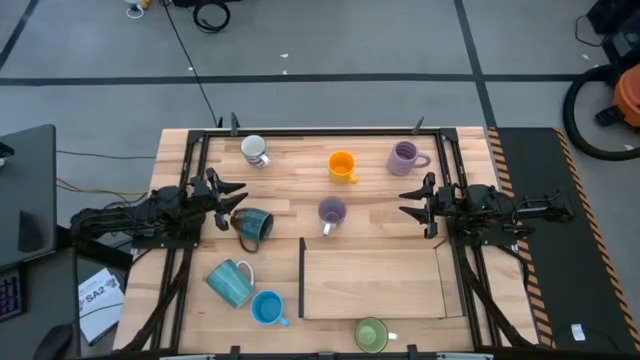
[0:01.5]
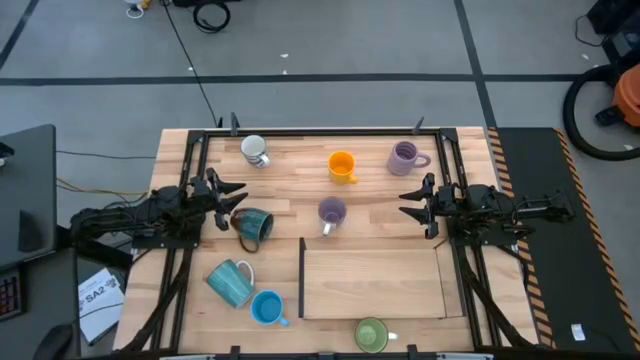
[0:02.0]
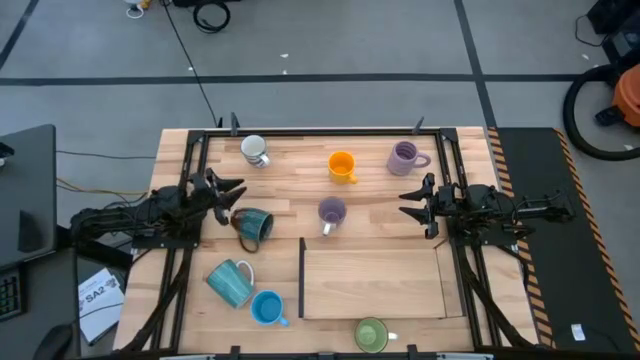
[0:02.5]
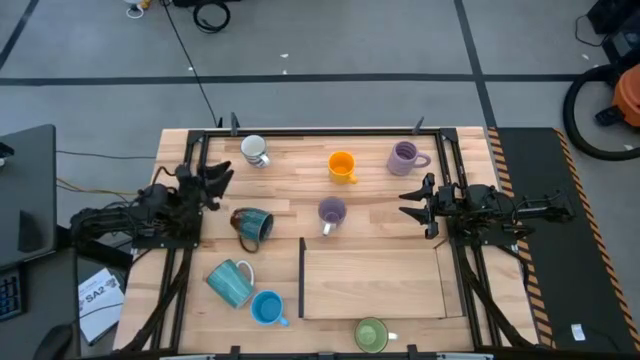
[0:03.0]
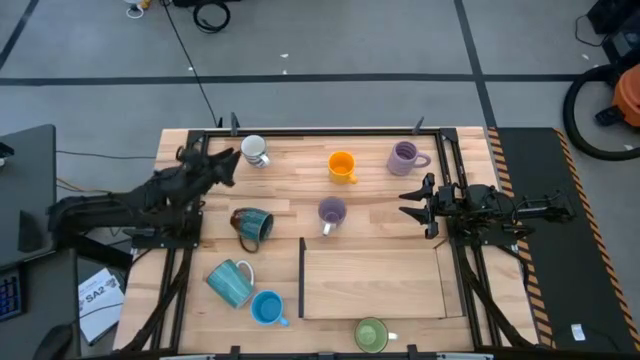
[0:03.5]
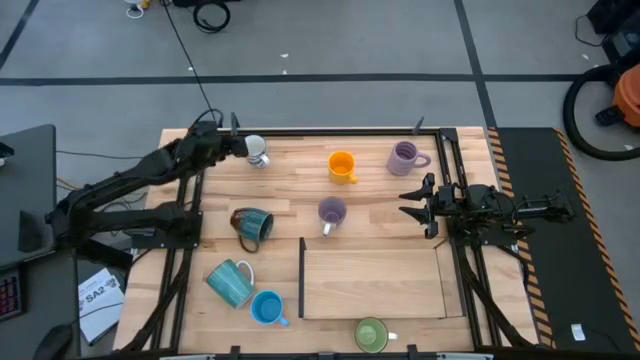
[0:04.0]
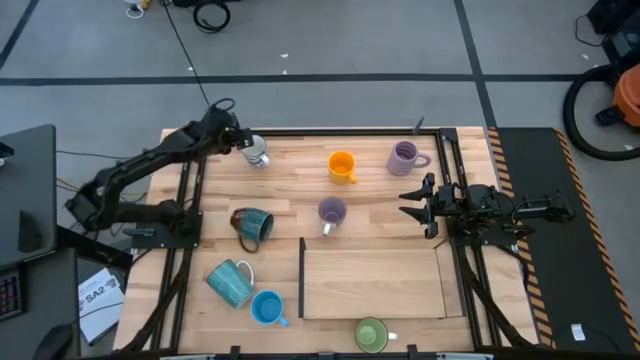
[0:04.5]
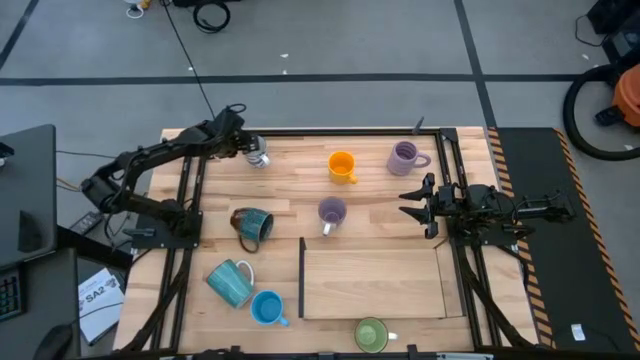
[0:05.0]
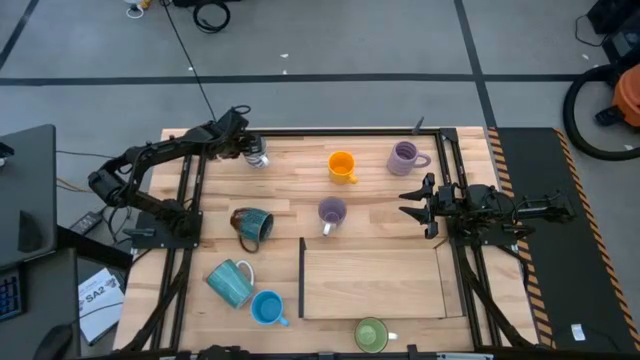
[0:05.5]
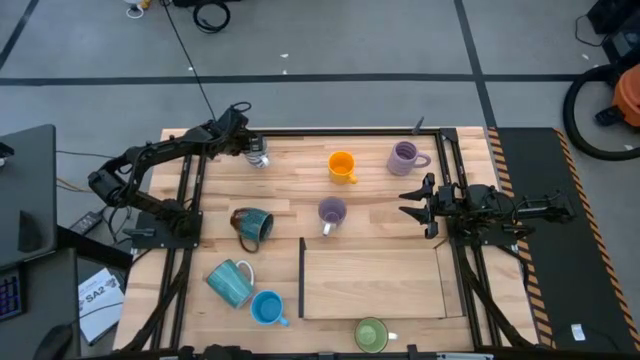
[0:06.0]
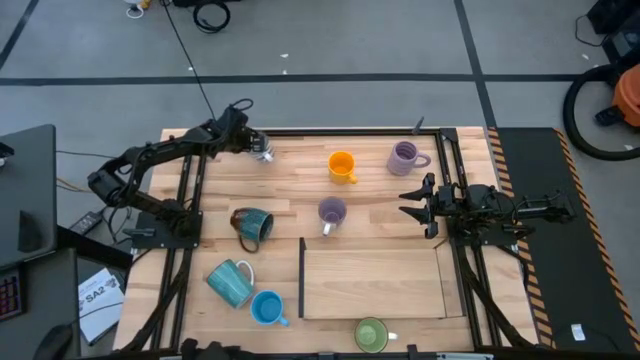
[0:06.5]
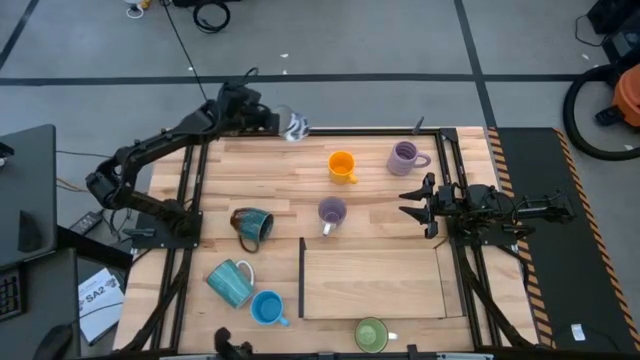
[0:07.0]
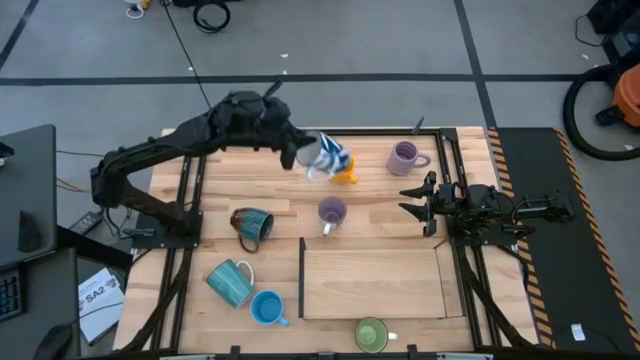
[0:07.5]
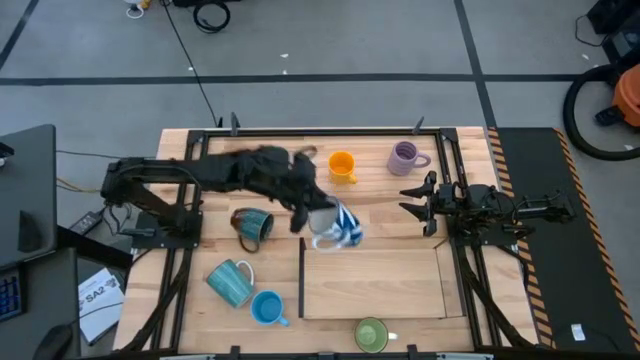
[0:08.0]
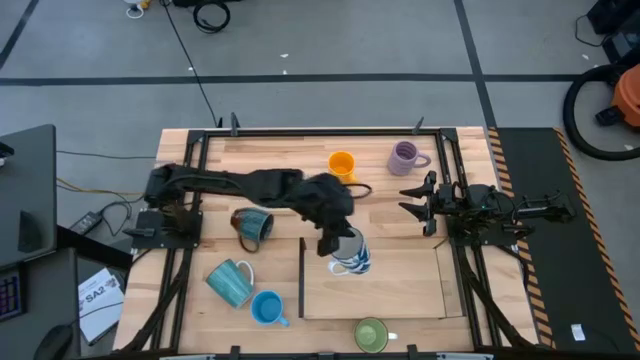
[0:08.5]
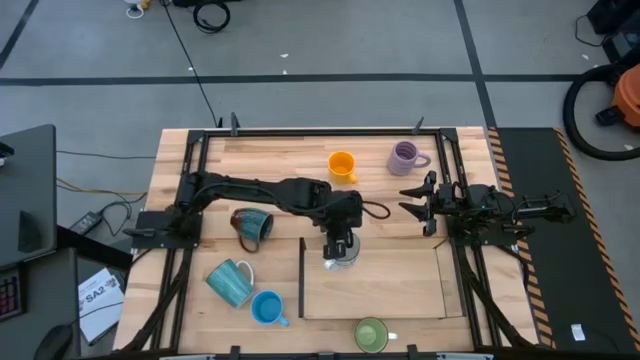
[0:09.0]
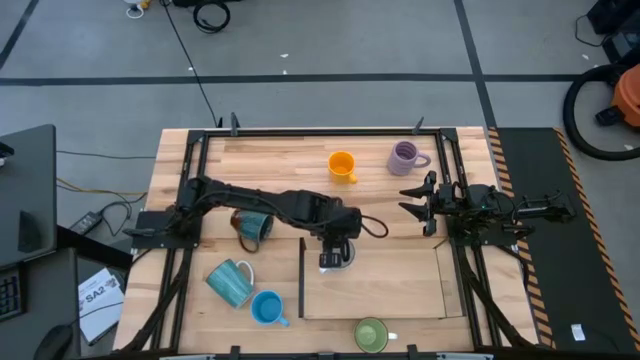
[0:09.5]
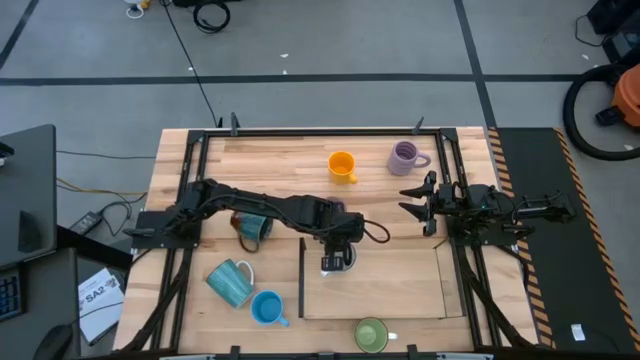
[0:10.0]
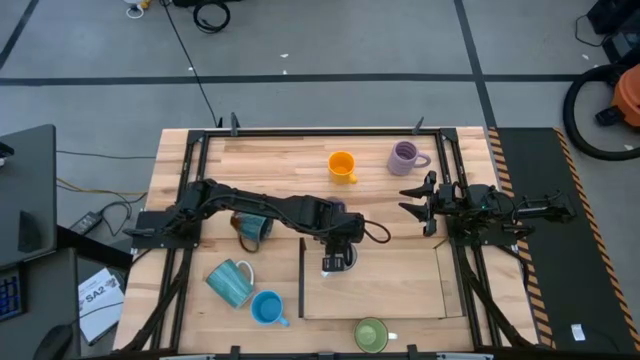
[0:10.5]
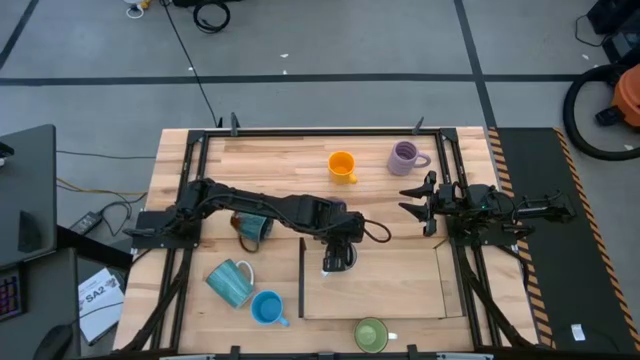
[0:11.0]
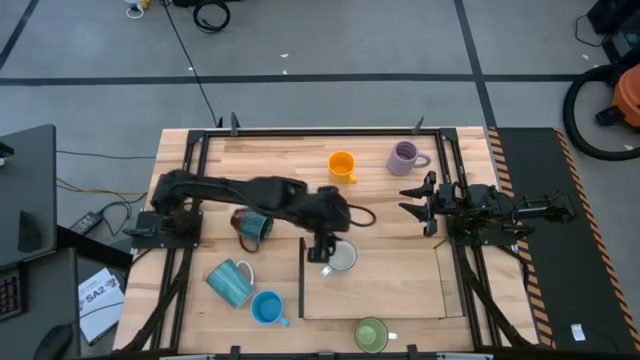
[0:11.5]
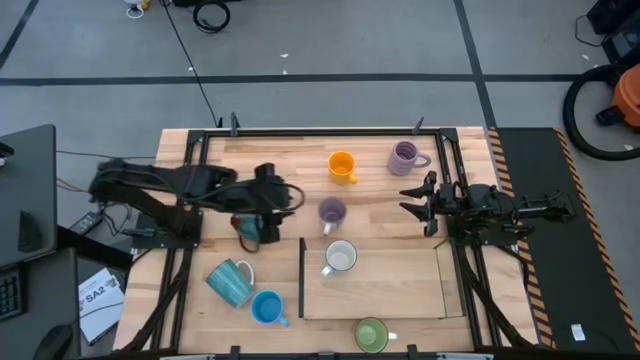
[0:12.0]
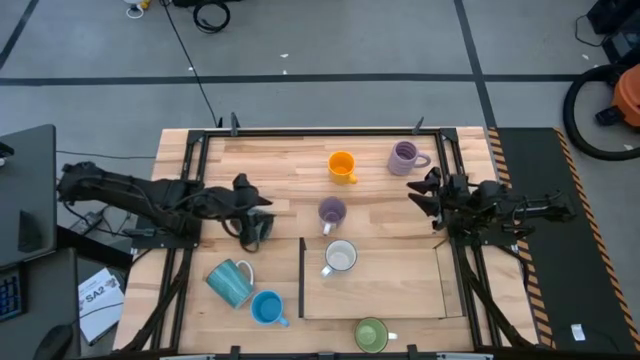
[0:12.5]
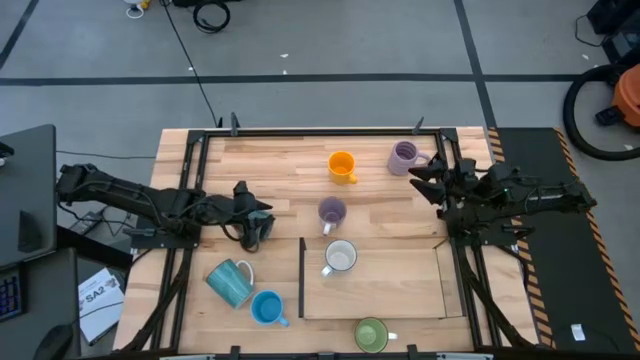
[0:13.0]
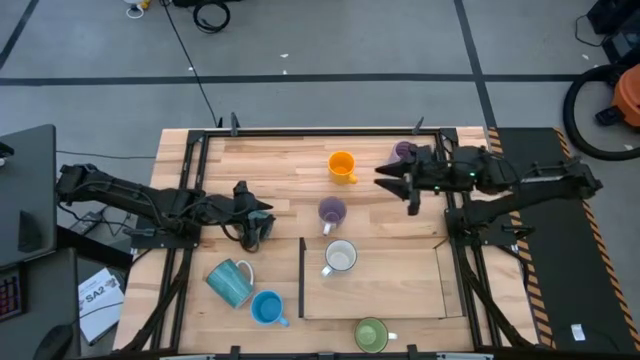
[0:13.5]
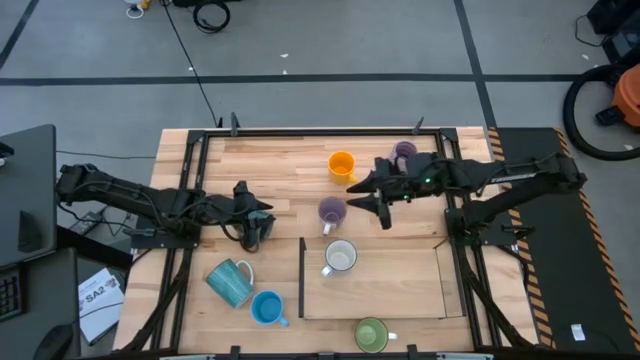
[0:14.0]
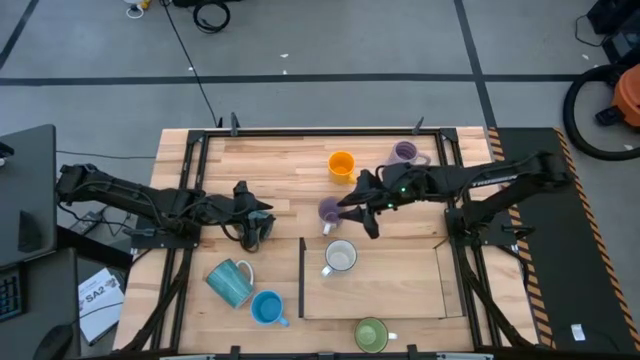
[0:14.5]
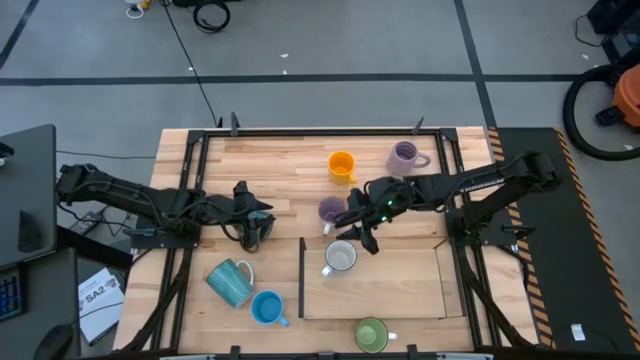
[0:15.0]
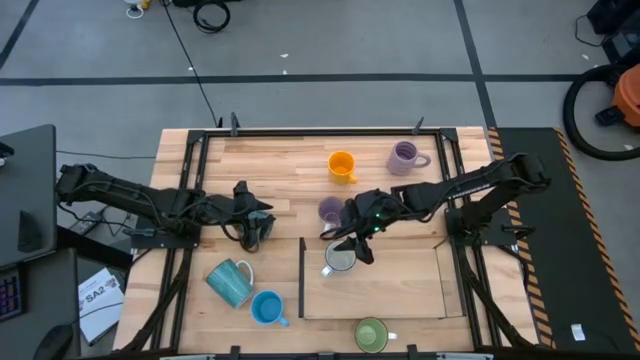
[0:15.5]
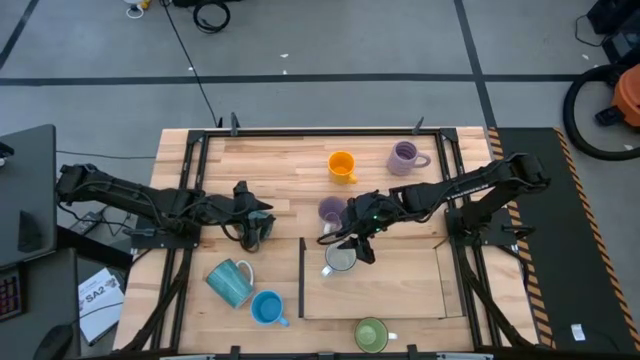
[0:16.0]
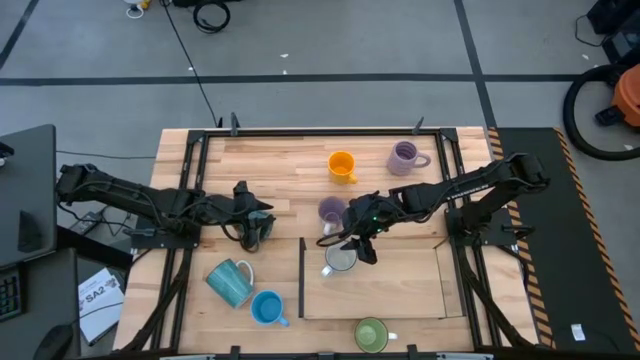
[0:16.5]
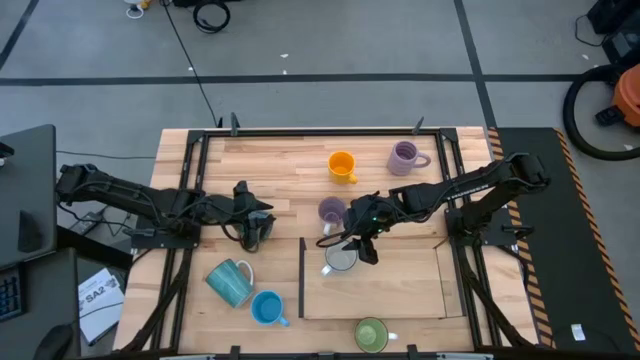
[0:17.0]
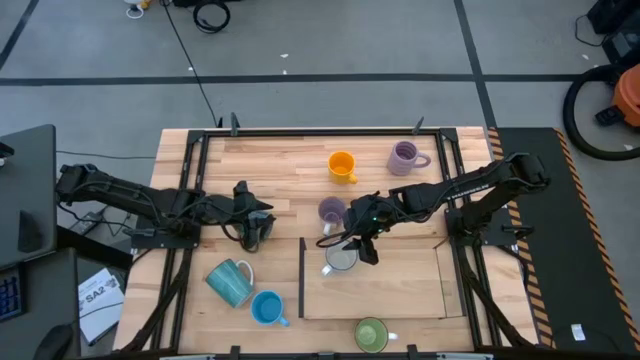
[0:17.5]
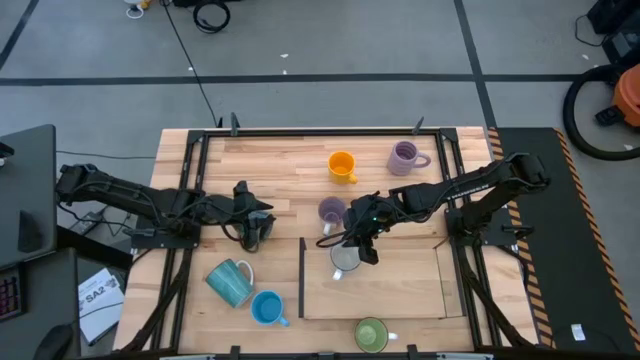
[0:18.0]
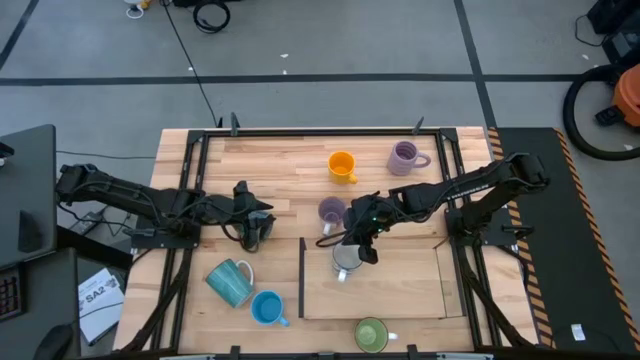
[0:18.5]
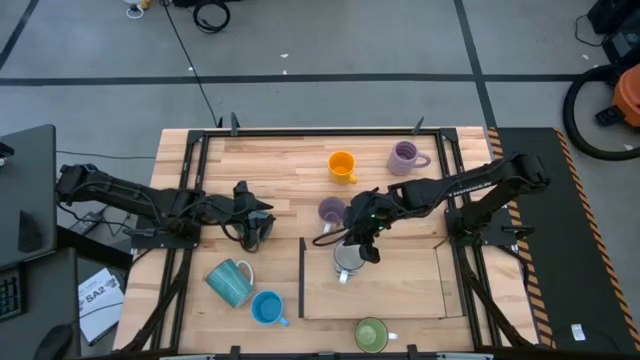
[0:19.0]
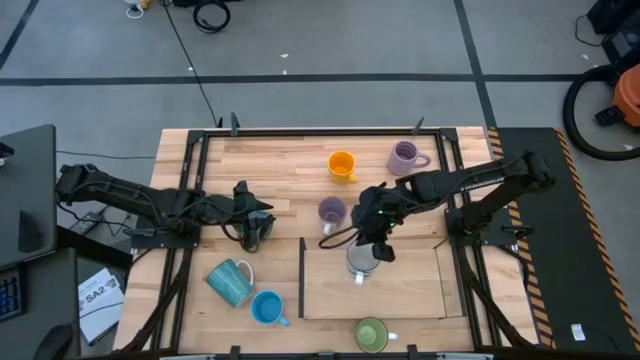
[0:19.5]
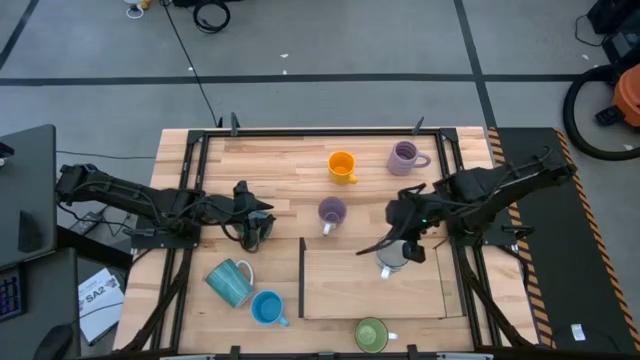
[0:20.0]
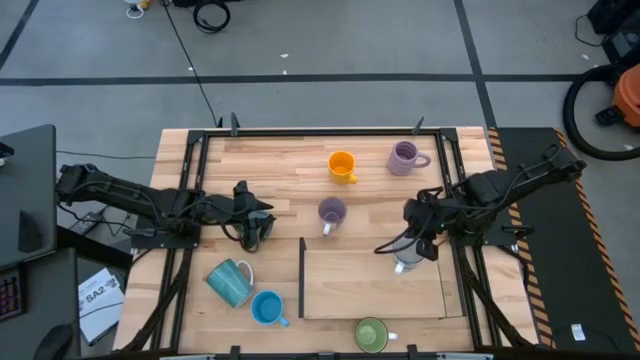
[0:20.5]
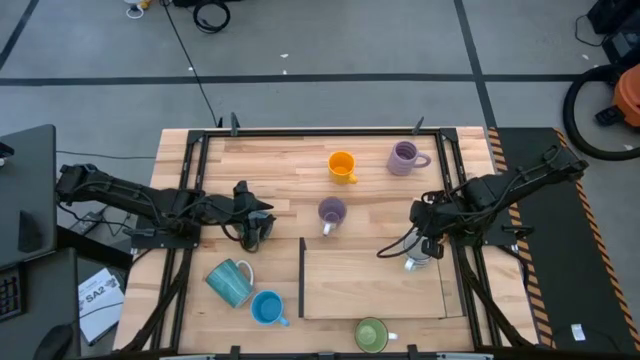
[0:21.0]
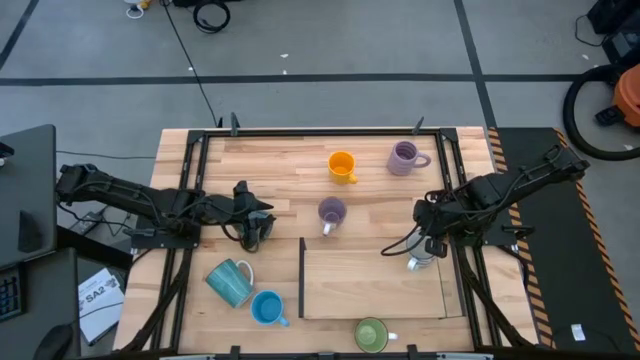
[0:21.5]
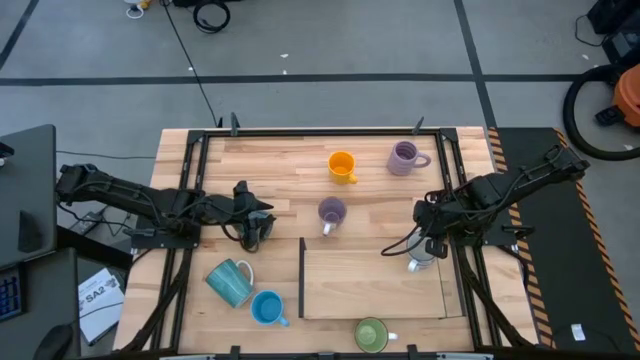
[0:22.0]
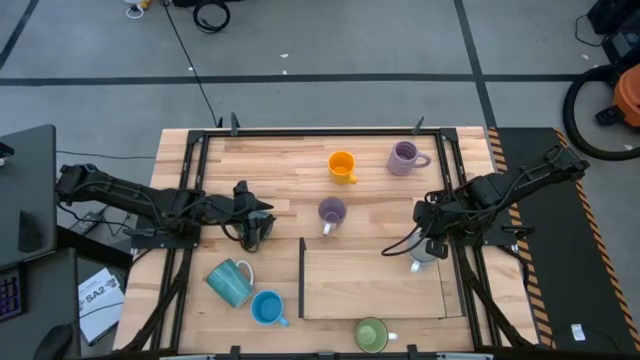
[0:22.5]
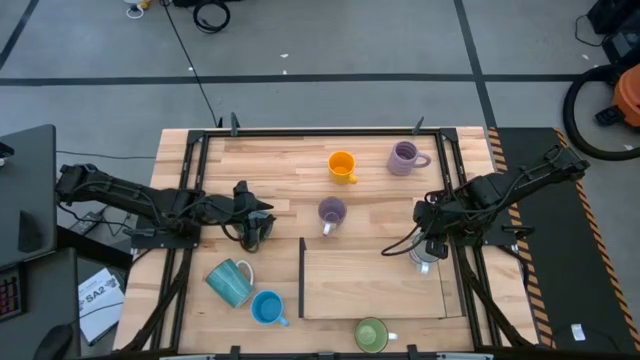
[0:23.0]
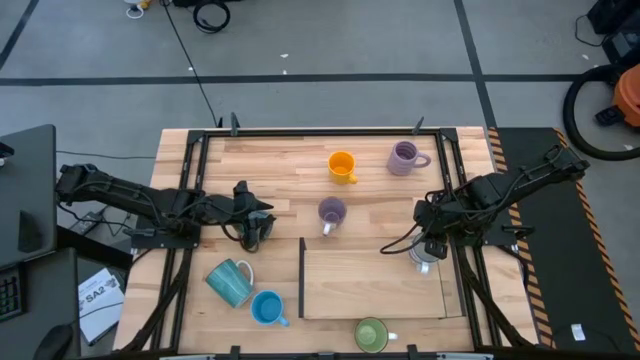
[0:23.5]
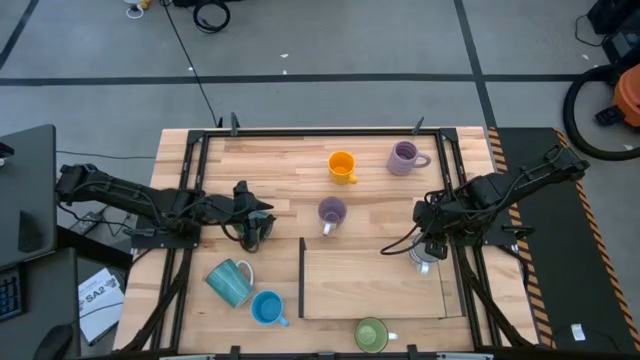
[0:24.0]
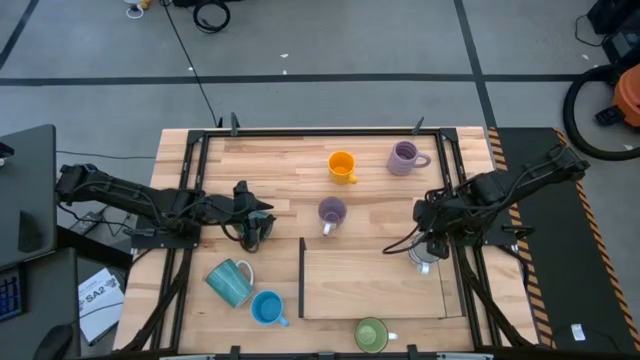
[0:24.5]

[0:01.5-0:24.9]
Task: Place coffee mugs
Put the white mug on the shelf
